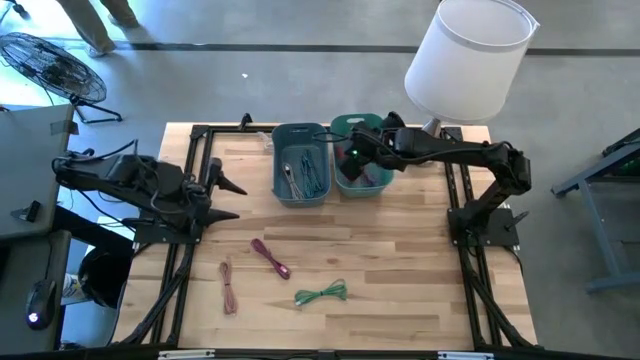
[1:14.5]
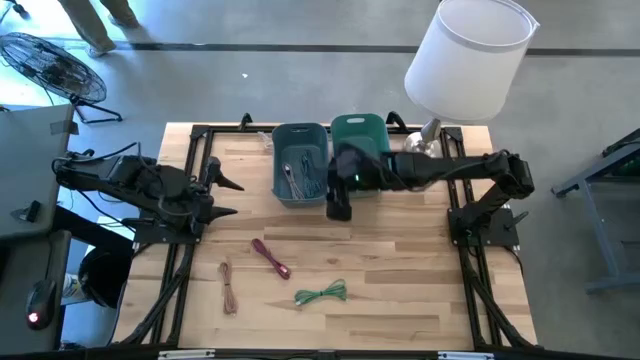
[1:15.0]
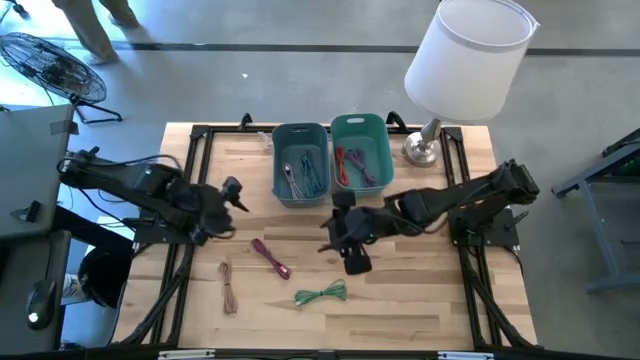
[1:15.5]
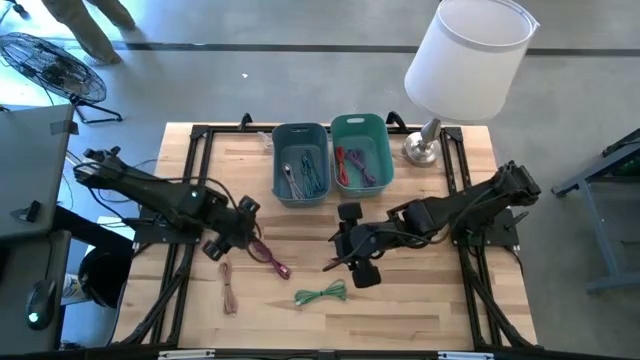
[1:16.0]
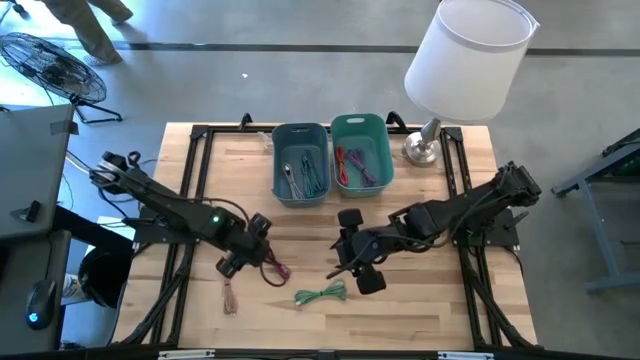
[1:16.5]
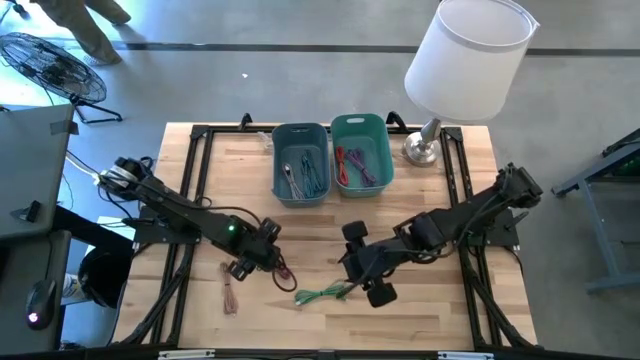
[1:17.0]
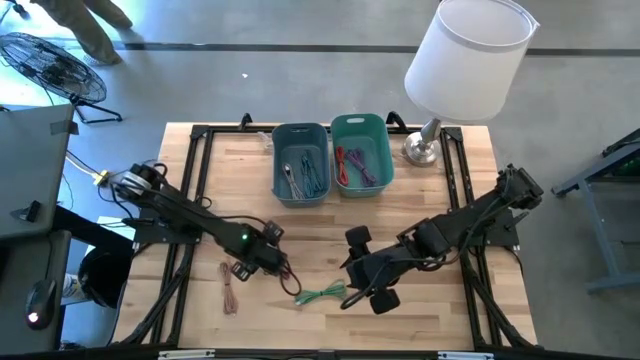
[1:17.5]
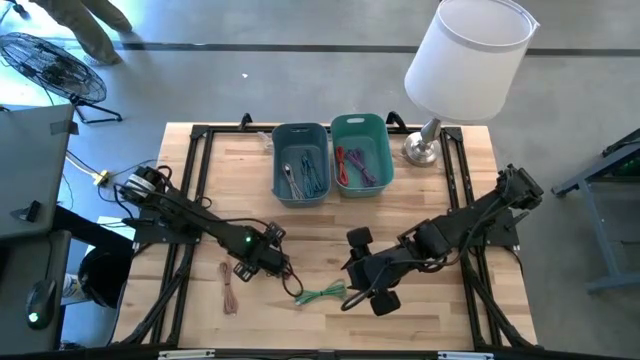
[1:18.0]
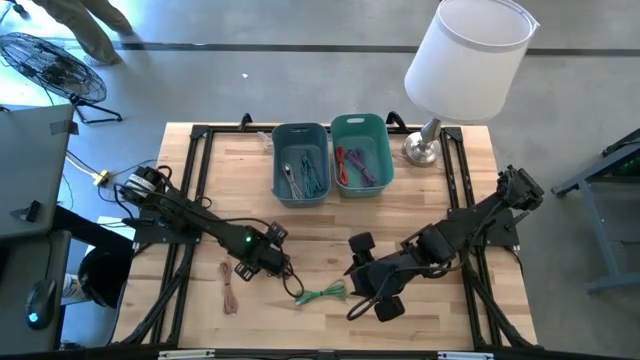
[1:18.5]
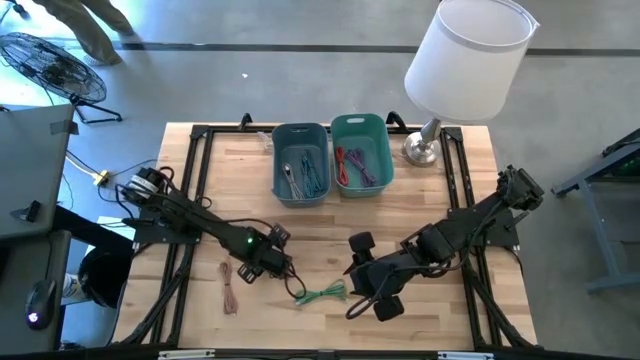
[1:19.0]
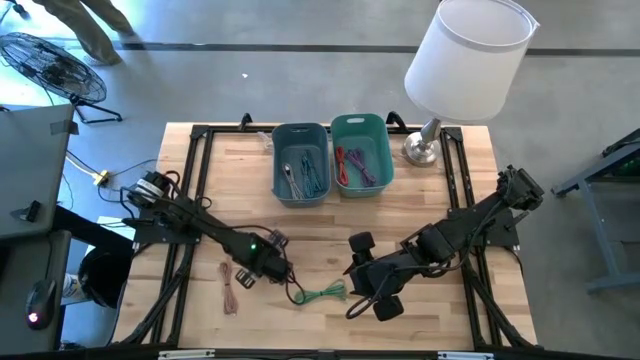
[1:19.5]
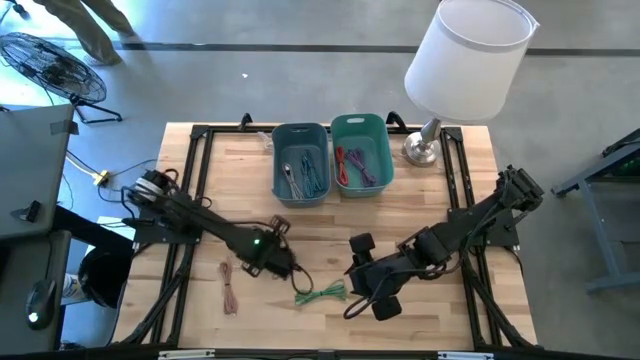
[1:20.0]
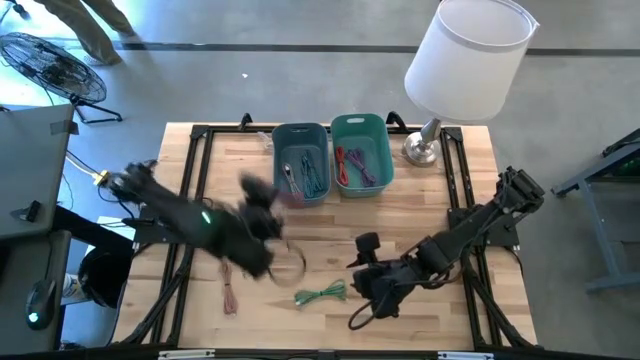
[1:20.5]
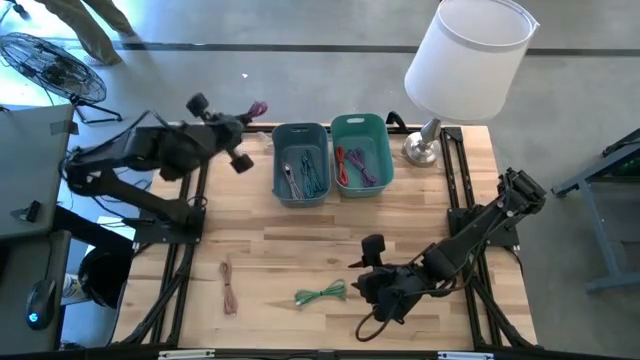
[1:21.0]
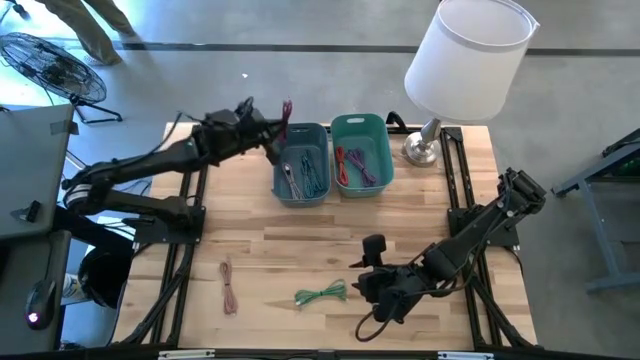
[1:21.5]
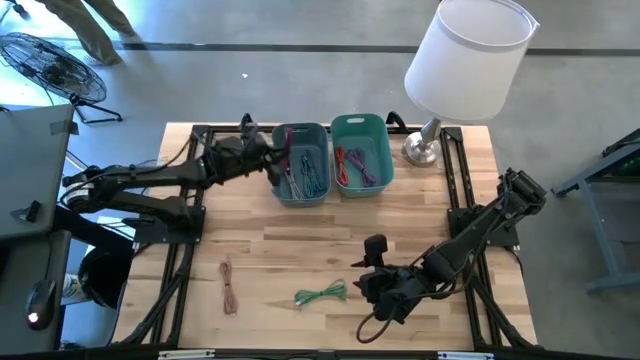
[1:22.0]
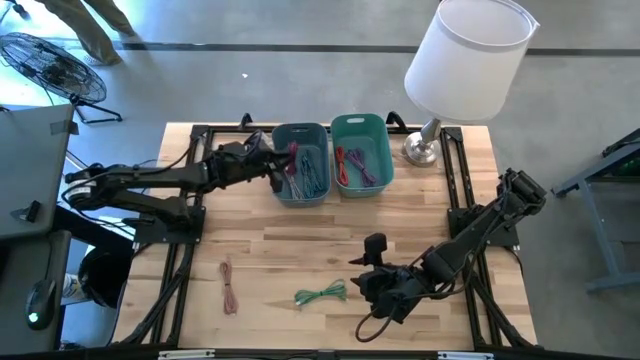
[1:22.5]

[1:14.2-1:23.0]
Task: Pick & Place USB Port
Put the pink charger cable into the blue bin

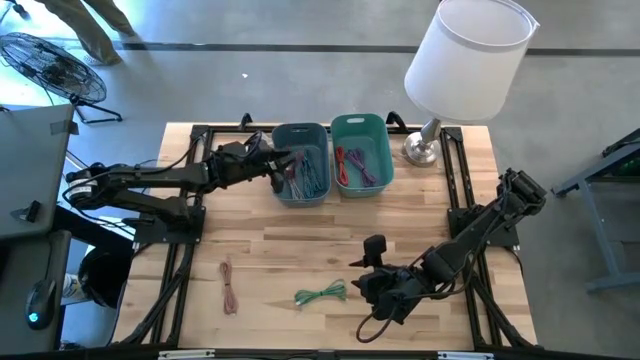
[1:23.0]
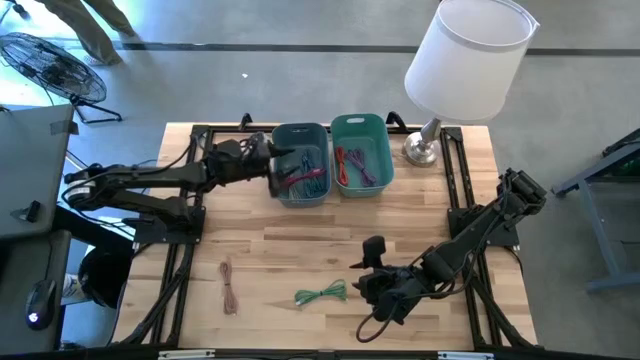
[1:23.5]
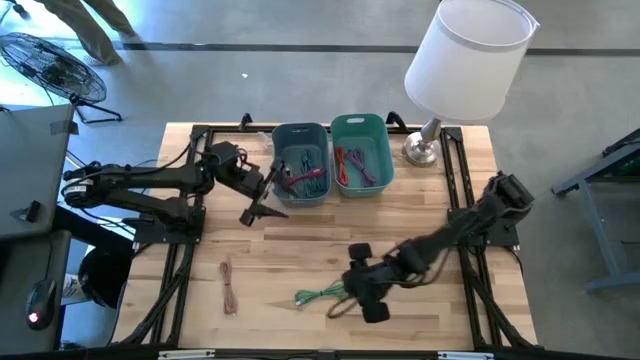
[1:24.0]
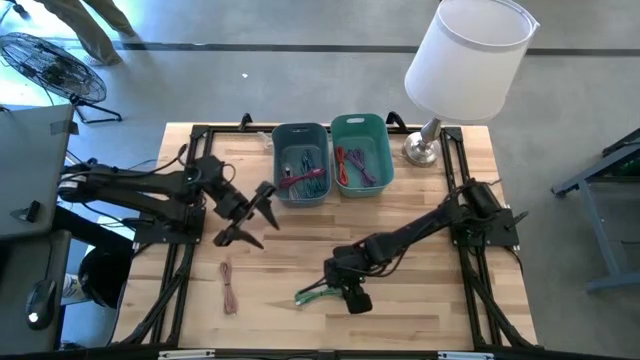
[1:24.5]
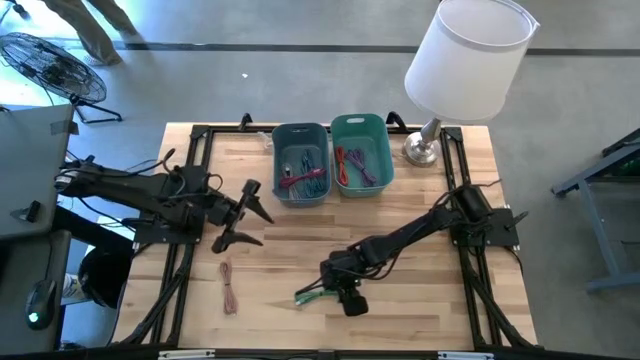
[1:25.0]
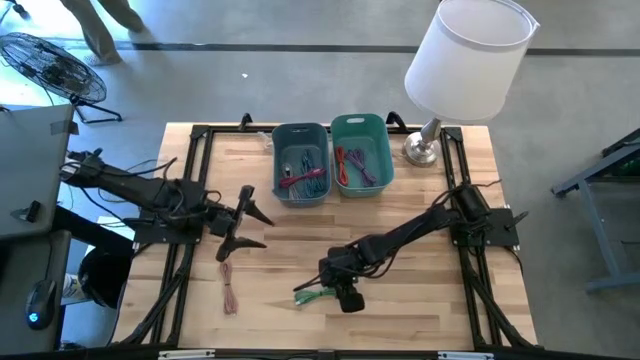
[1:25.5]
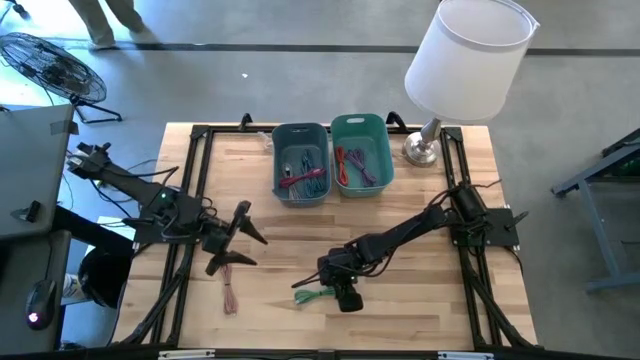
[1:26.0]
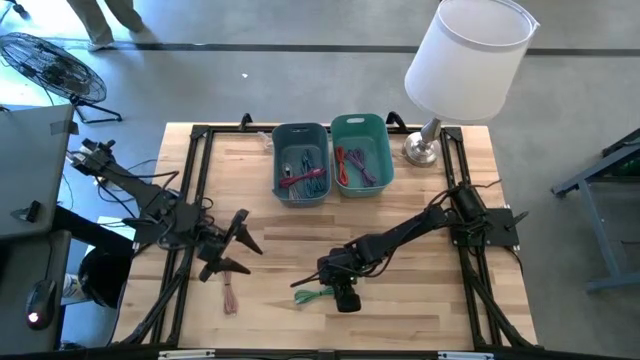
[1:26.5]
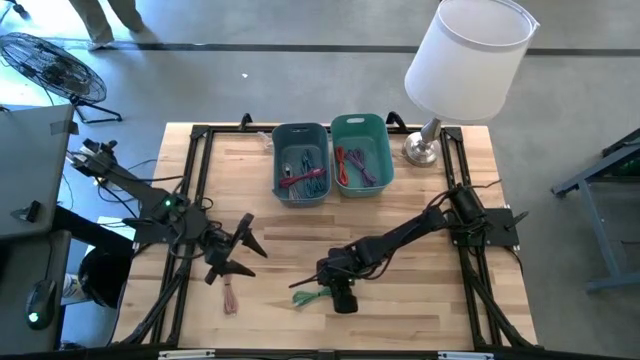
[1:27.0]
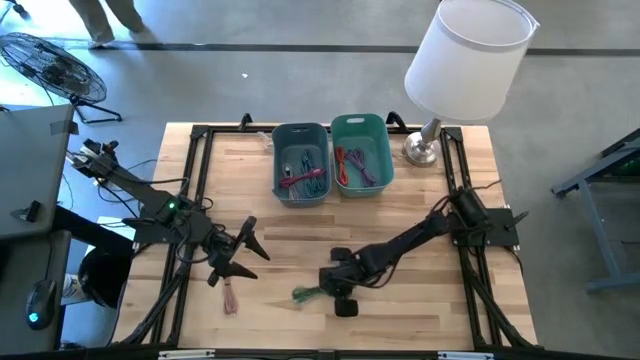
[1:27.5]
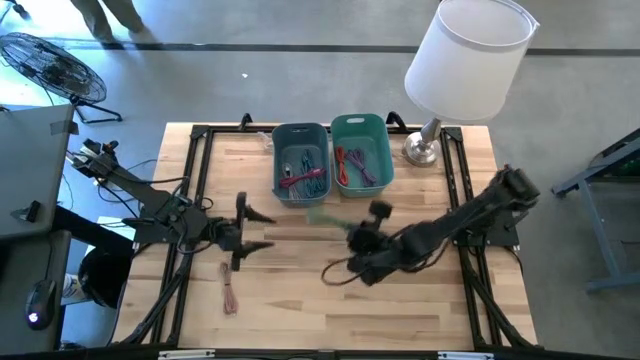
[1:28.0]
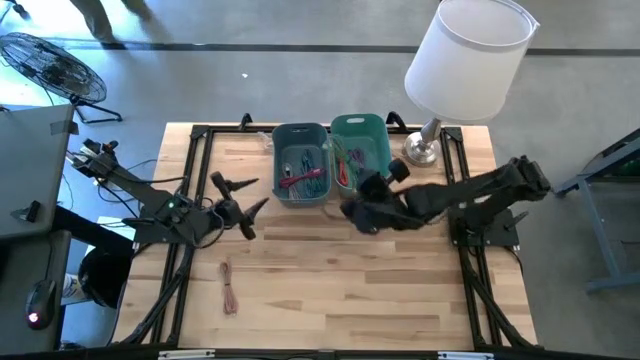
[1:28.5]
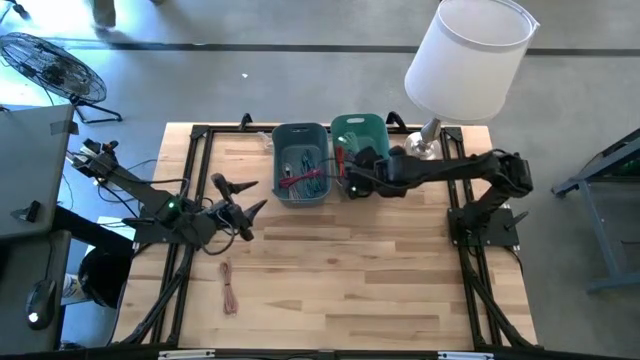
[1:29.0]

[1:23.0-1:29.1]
Put the green charger cable into the green bin

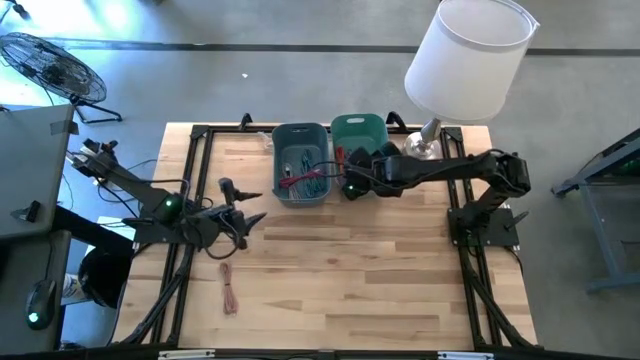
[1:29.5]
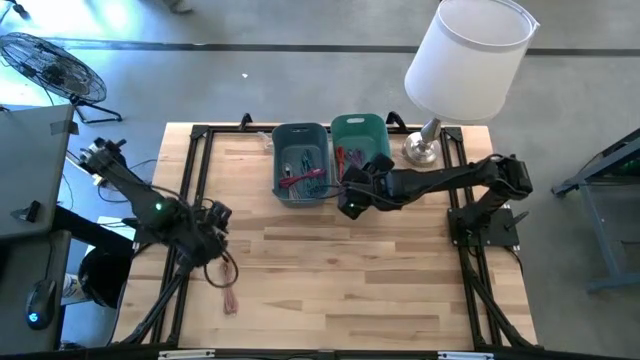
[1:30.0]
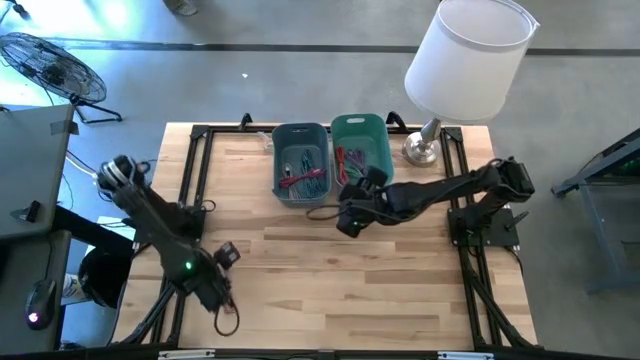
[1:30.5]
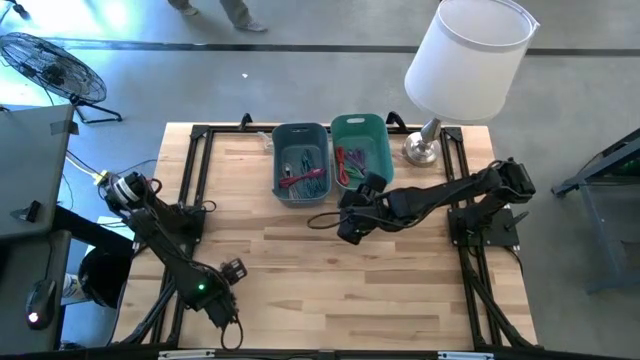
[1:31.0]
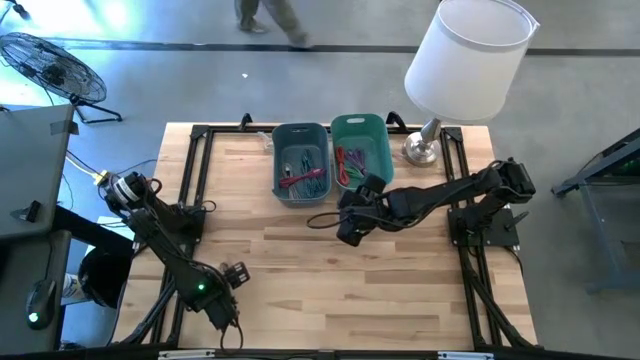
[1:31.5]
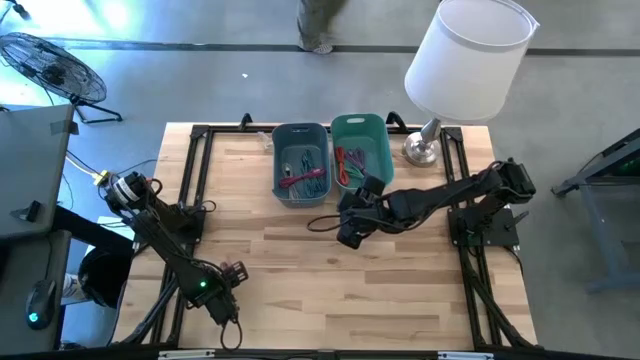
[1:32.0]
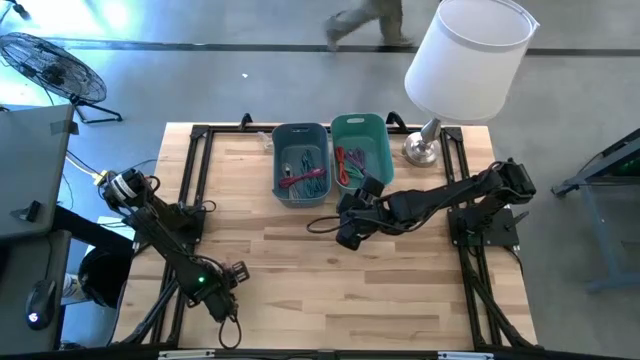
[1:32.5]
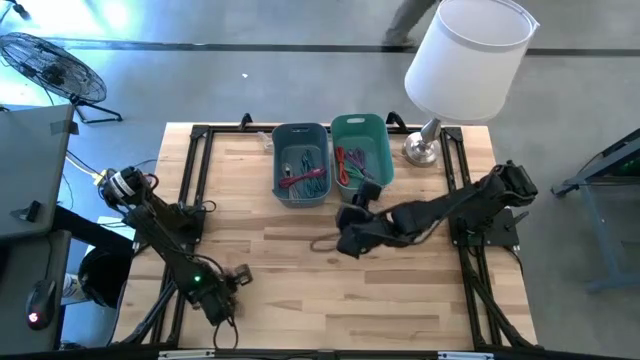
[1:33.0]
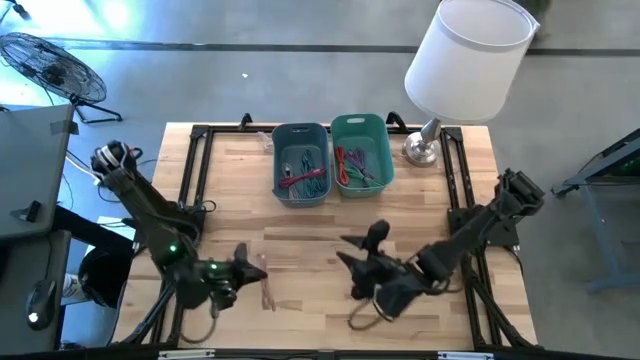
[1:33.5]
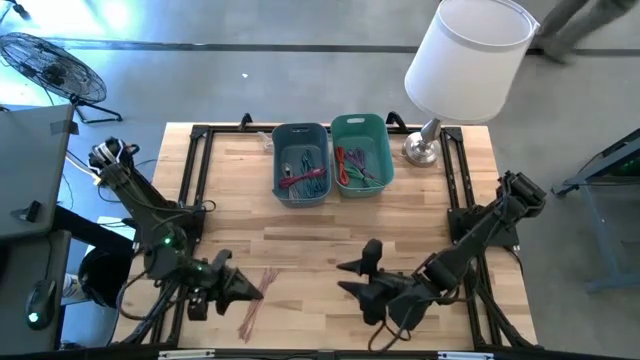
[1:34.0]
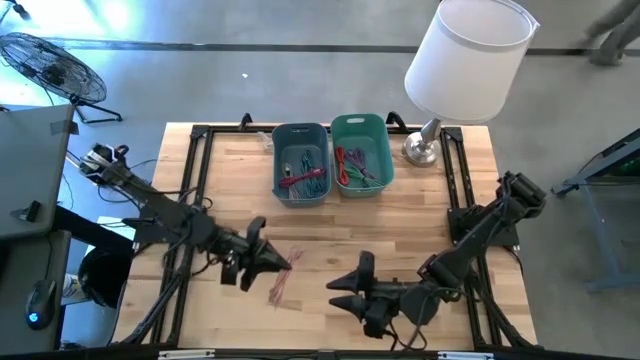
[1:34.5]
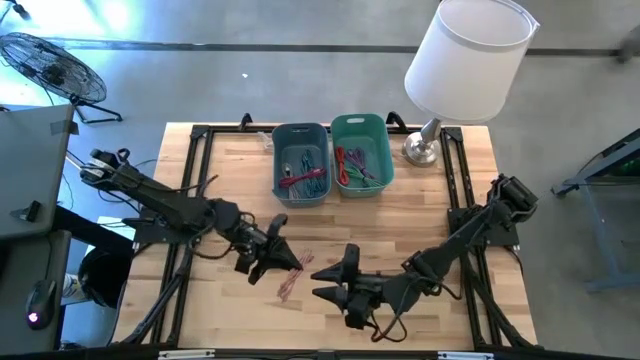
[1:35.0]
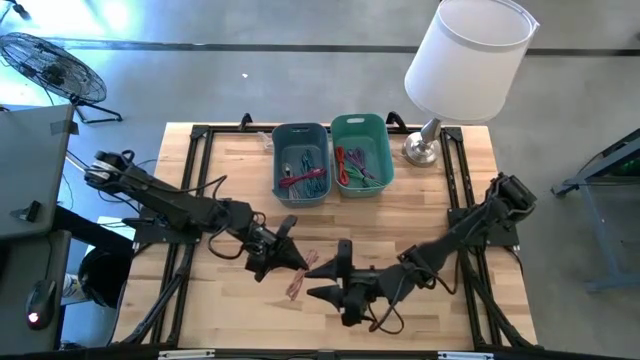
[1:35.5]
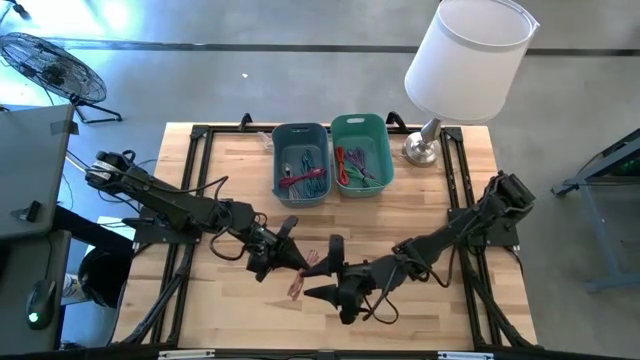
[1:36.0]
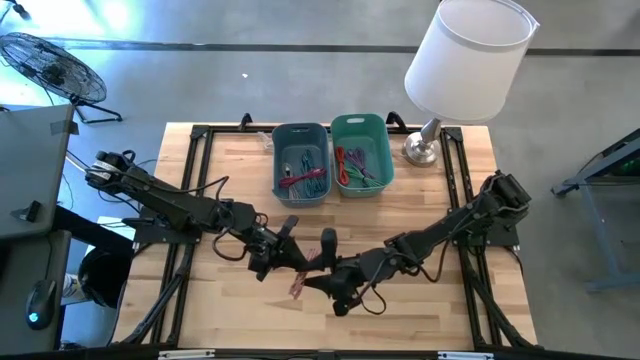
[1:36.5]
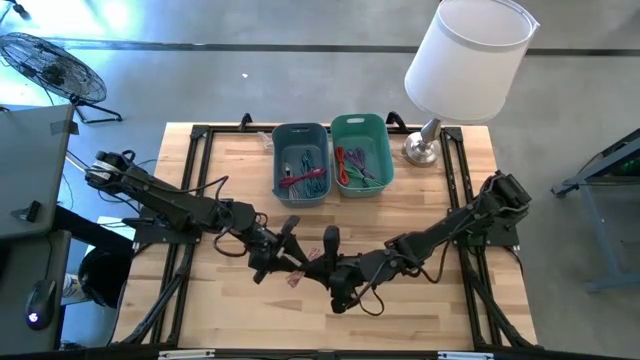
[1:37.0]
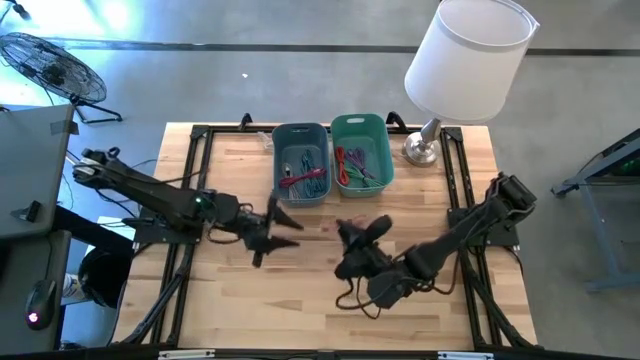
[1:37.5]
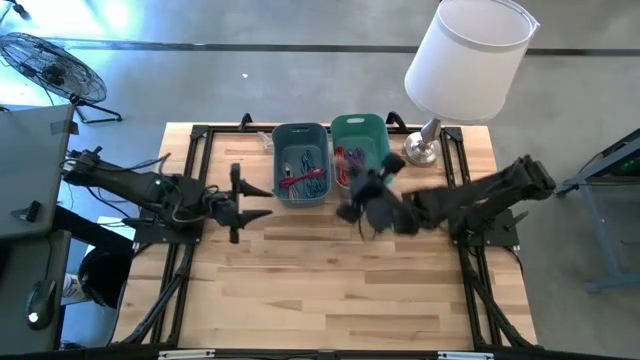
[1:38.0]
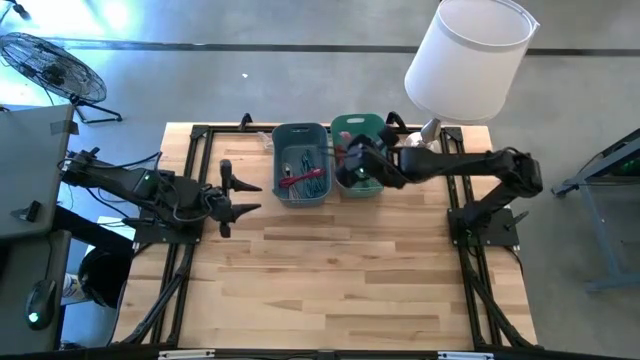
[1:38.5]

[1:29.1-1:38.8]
Put the brown charger cable into the green bin
